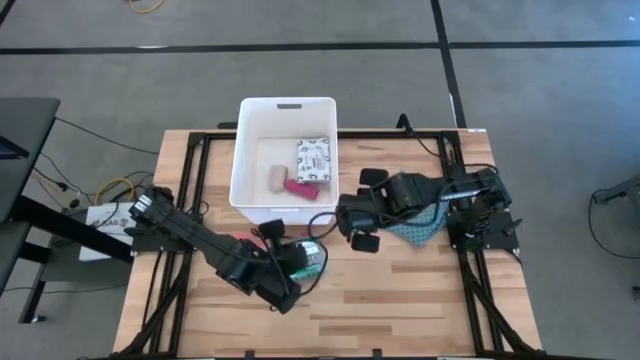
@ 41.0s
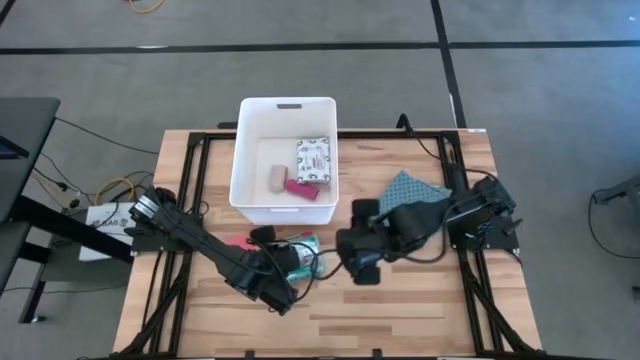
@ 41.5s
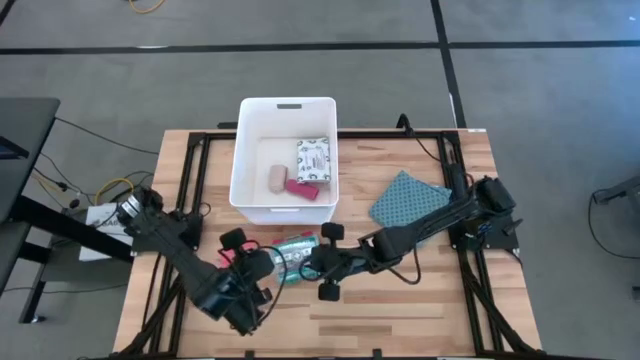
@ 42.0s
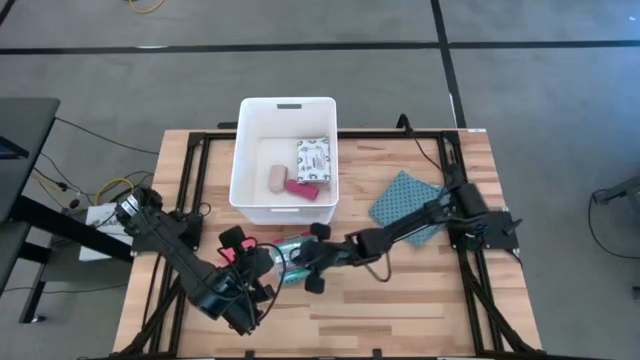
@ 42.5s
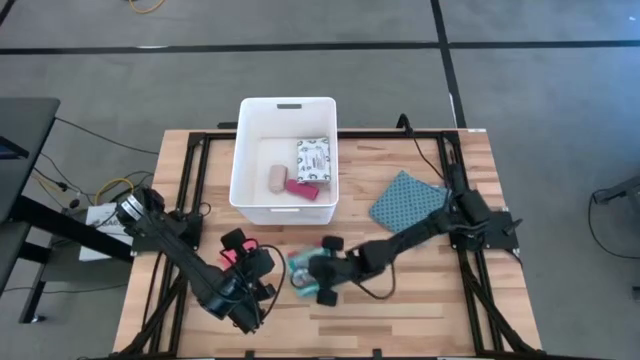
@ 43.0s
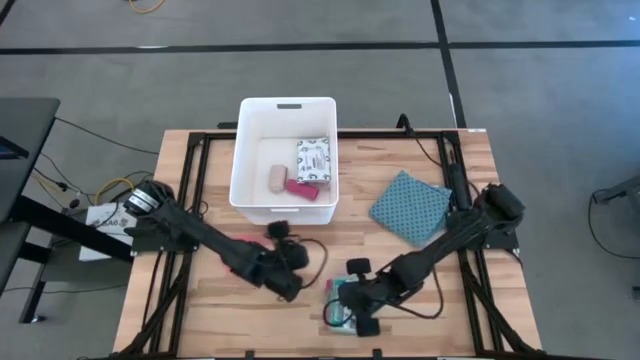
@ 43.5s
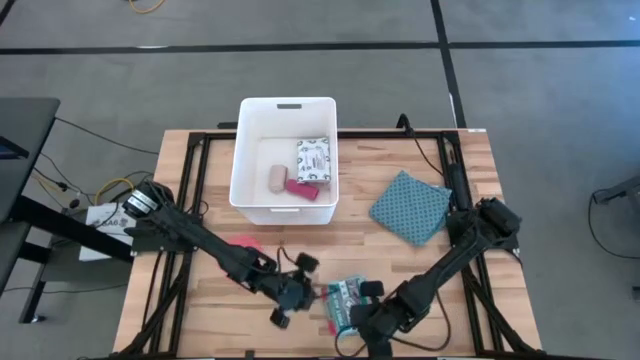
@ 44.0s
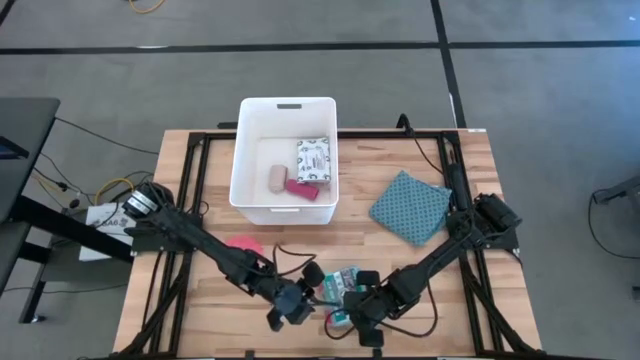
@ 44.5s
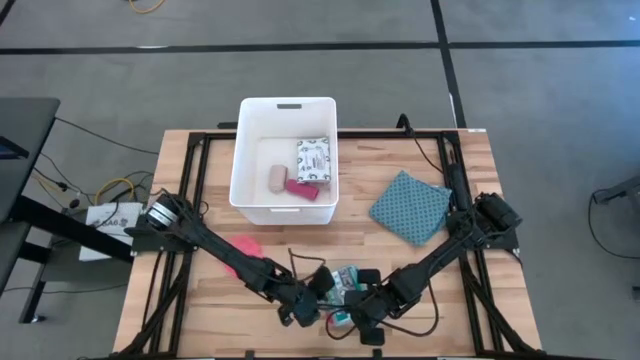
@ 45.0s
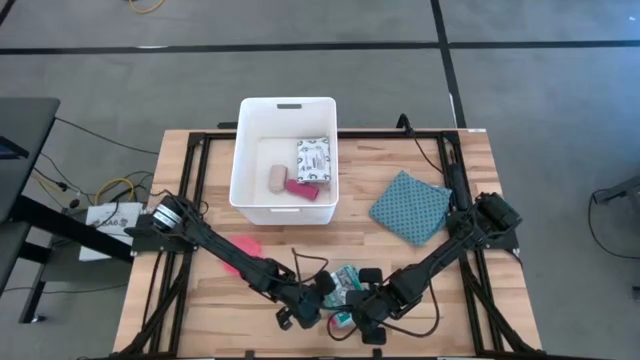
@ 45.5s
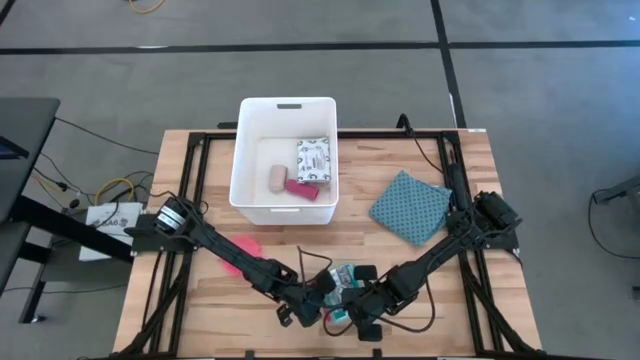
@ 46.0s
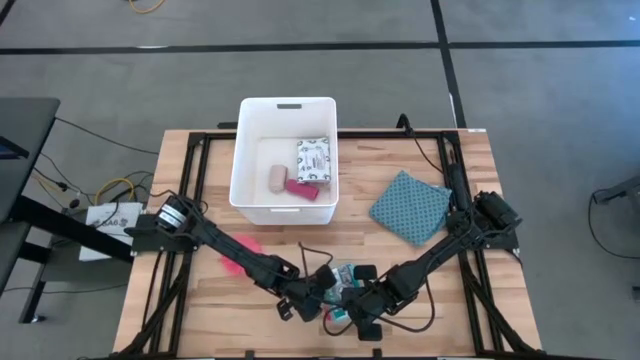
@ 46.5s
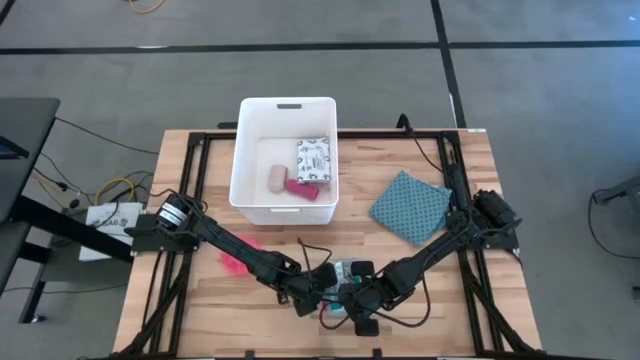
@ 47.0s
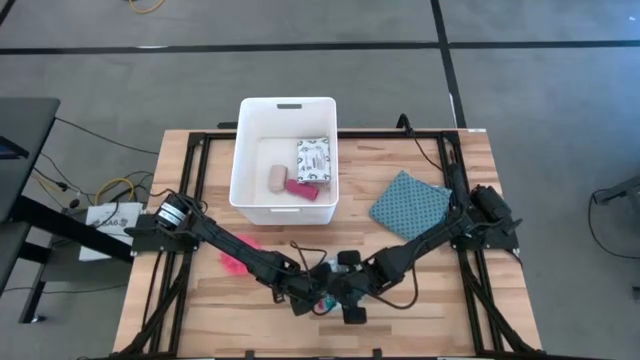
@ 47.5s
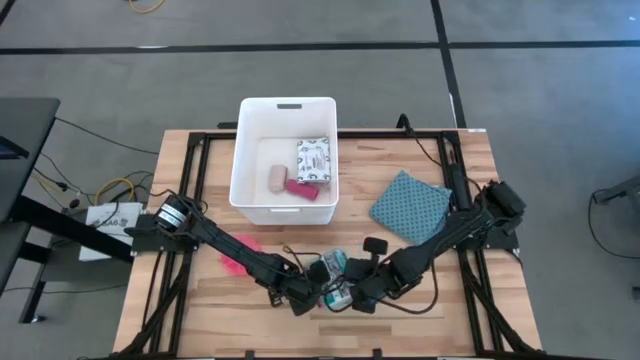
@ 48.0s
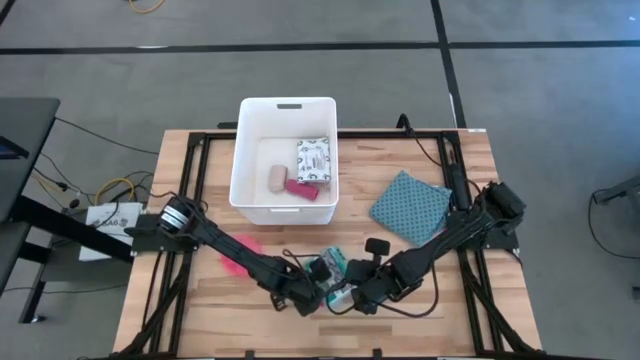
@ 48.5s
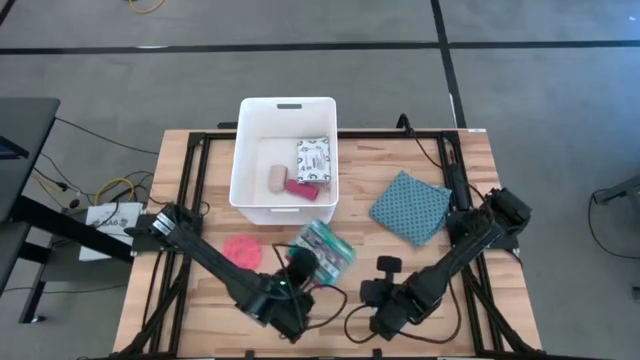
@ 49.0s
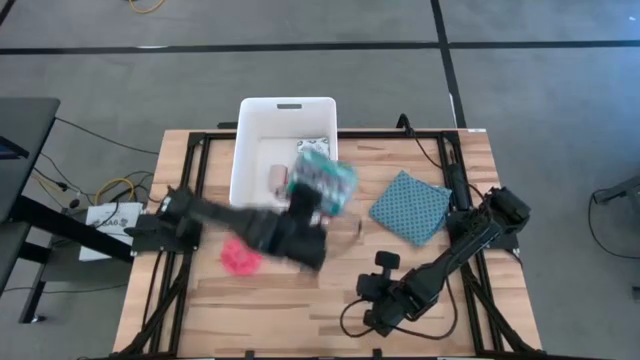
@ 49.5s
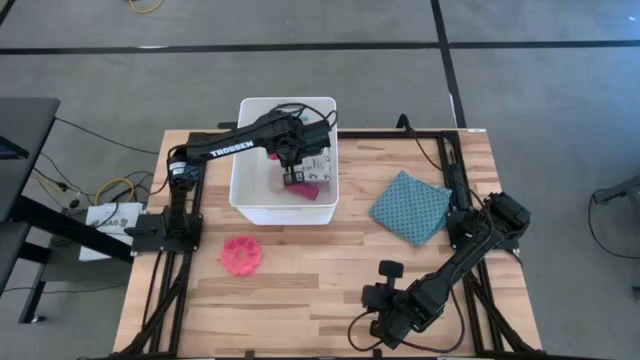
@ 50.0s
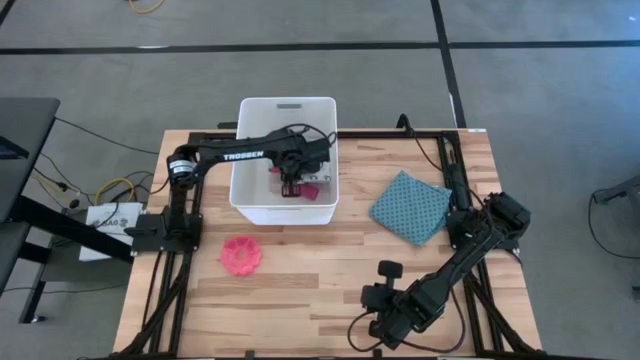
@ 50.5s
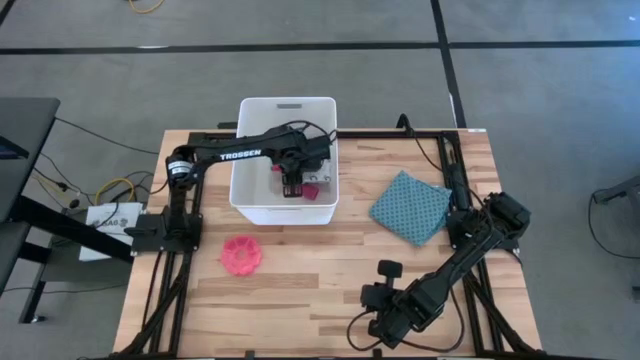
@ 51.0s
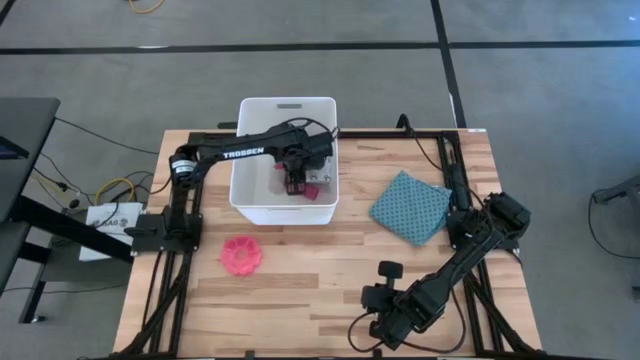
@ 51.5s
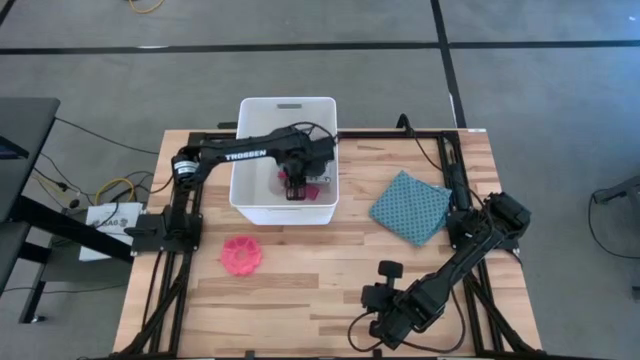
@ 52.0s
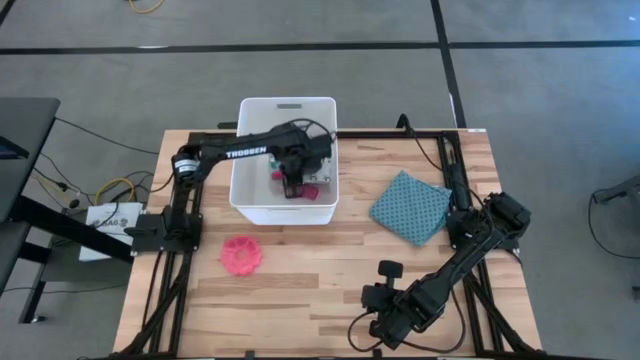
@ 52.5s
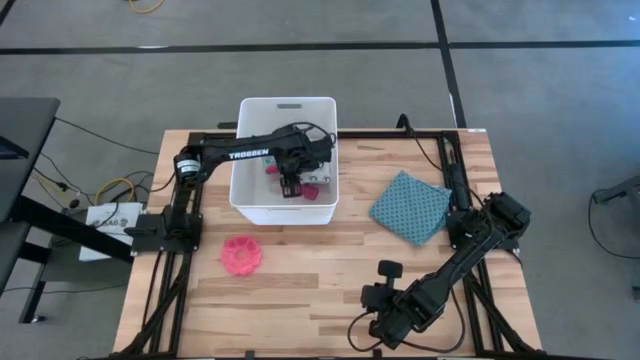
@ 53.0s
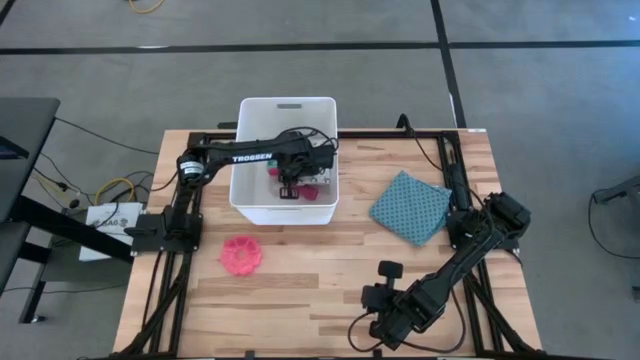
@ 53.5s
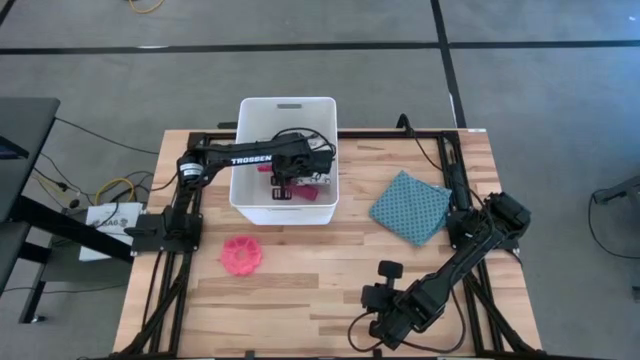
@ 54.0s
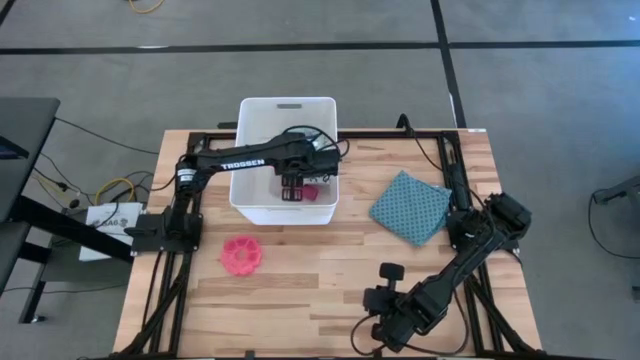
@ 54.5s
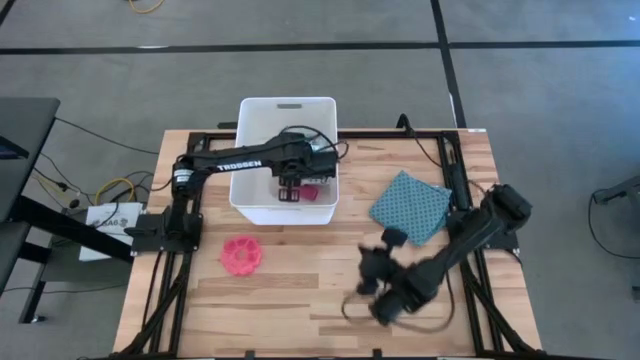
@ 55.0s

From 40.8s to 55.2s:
Task: Pick & place medical supplies in basket/bin
Put the first aid kit box into the white bin

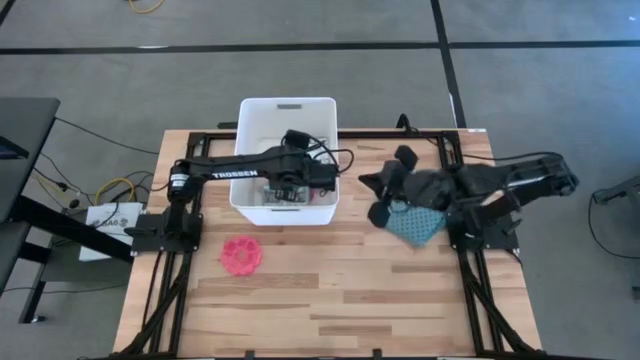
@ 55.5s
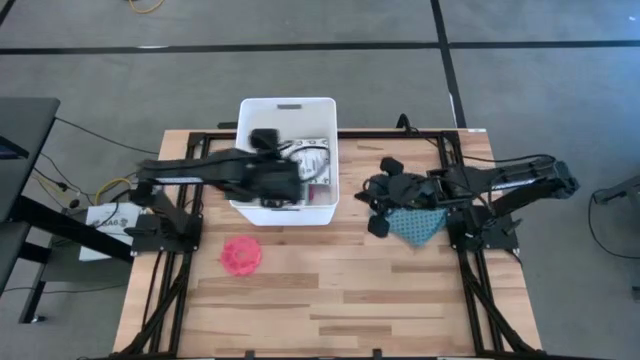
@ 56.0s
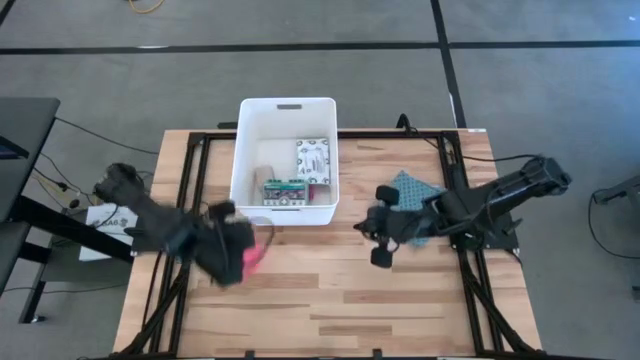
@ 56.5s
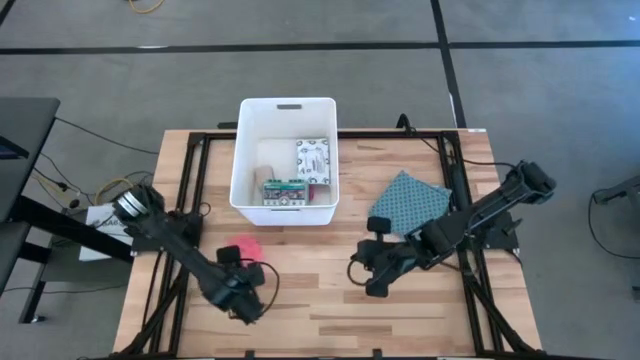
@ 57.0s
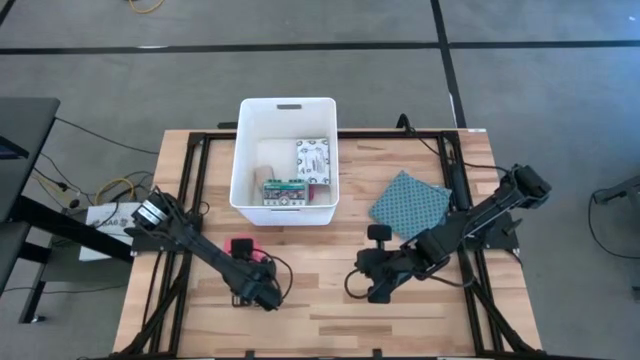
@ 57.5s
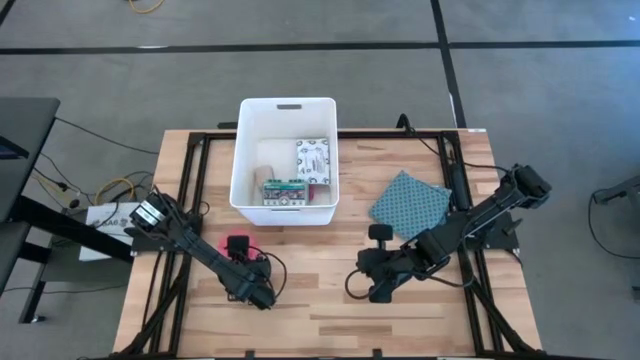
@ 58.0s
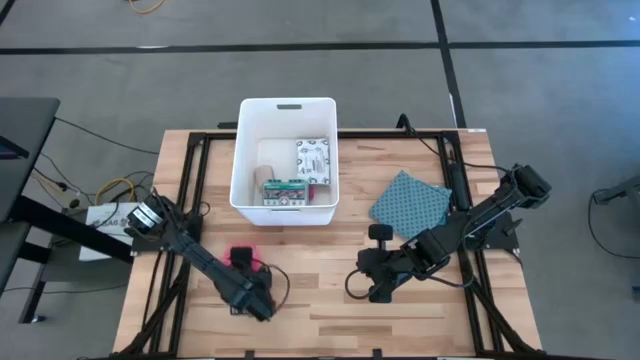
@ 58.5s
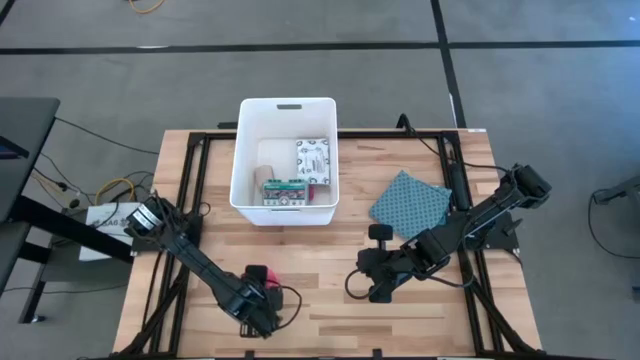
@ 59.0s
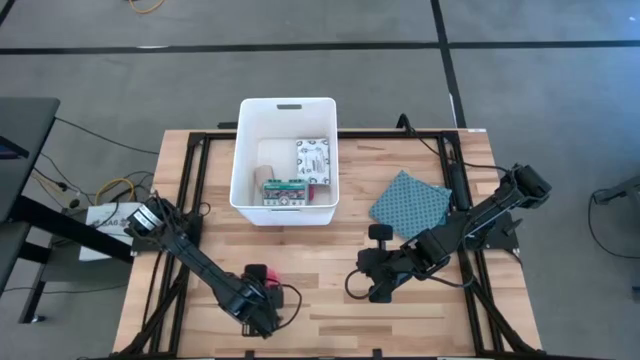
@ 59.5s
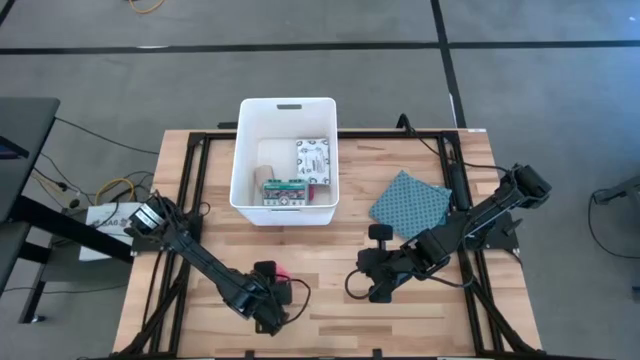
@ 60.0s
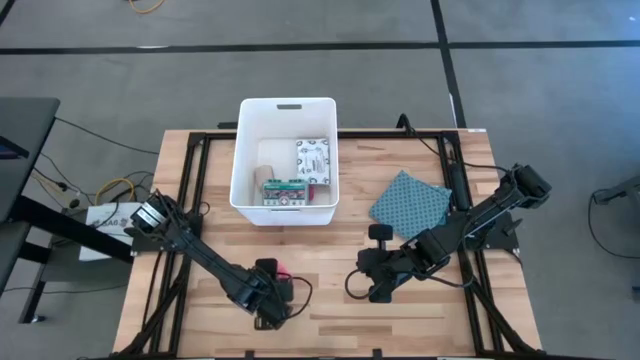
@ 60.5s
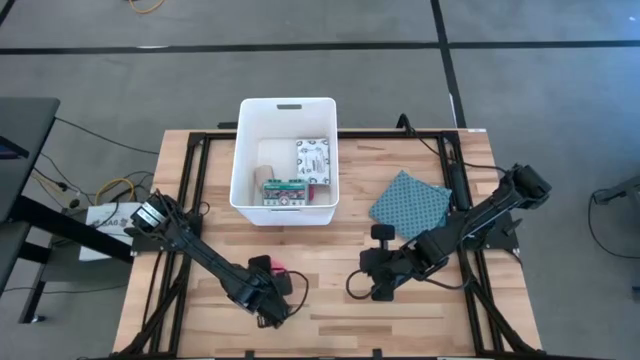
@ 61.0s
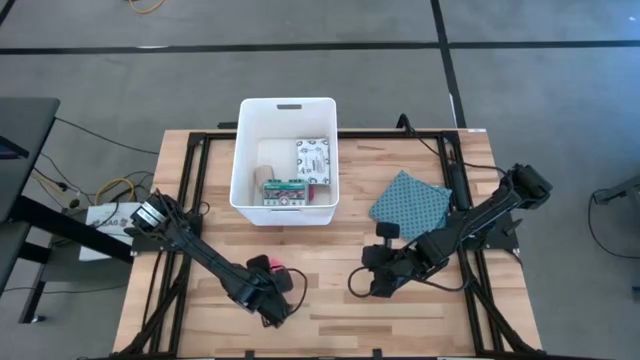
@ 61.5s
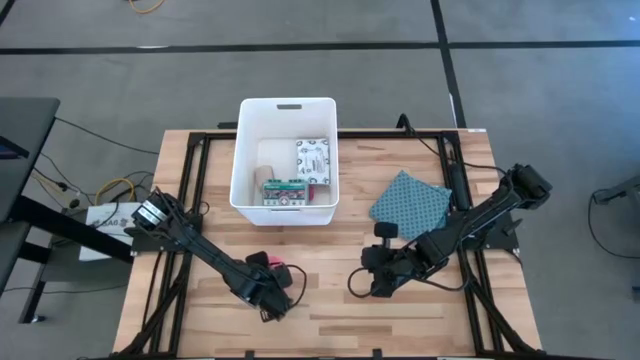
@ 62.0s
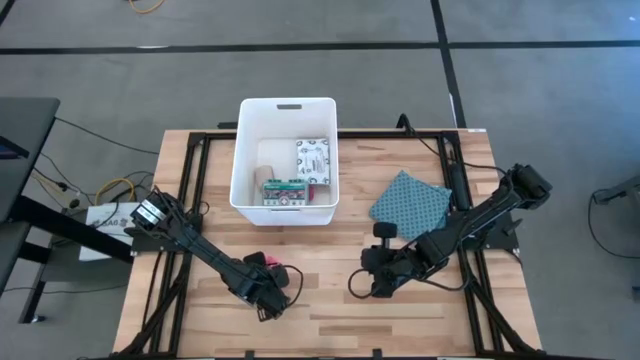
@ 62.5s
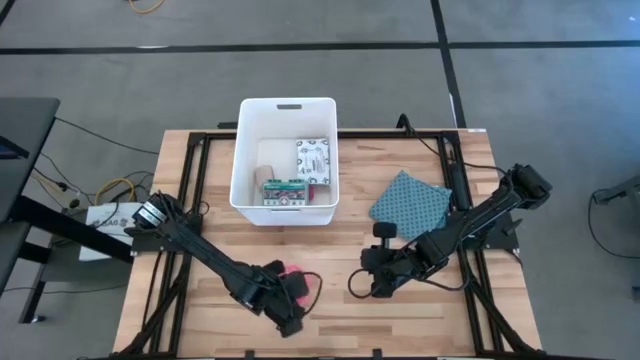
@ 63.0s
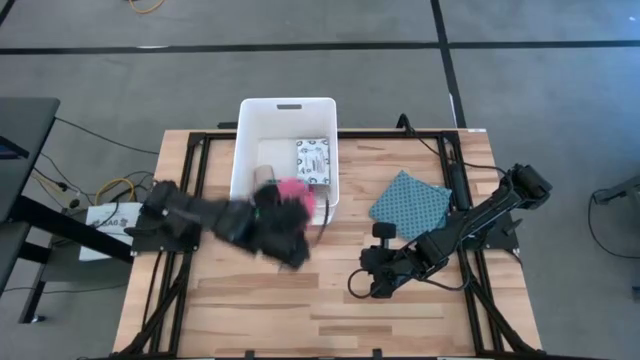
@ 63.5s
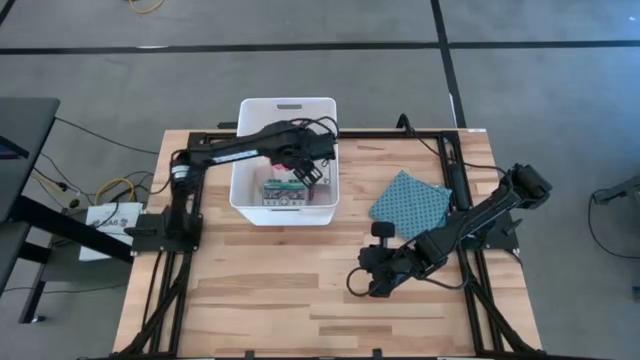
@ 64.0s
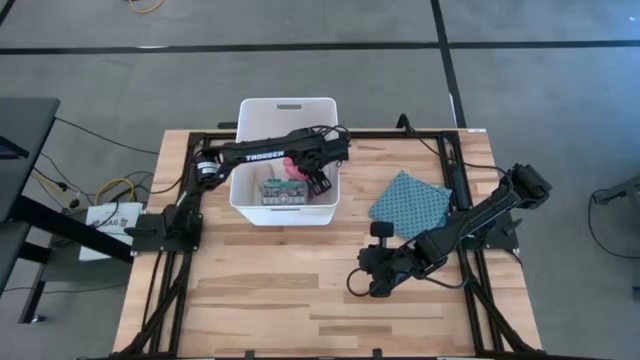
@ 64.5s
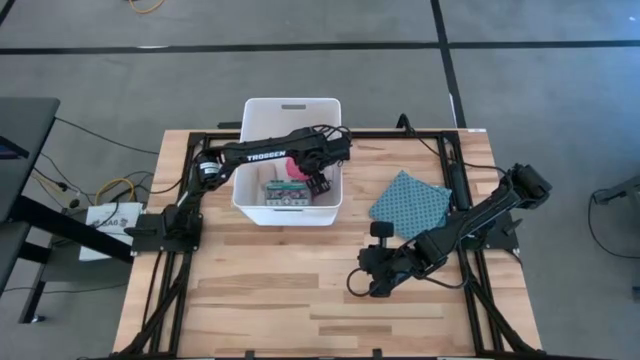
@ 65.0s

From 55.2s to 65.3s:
Put the pink pill organizer into the white bin
